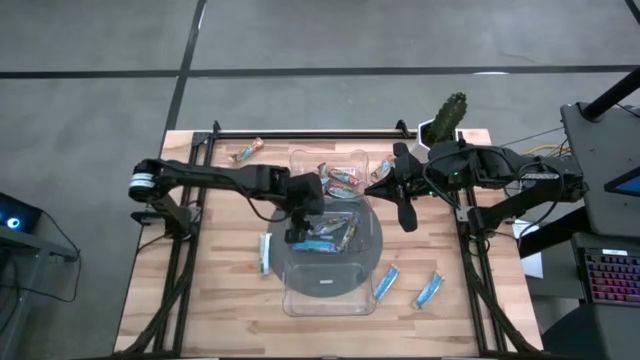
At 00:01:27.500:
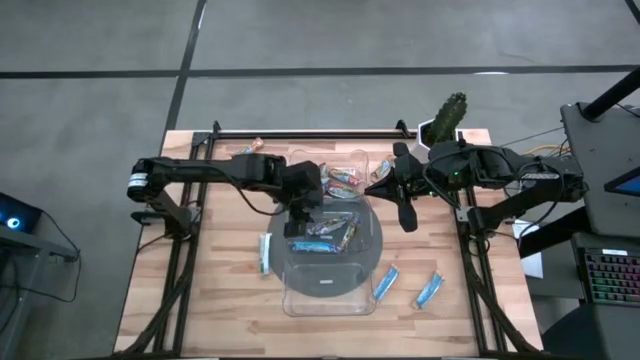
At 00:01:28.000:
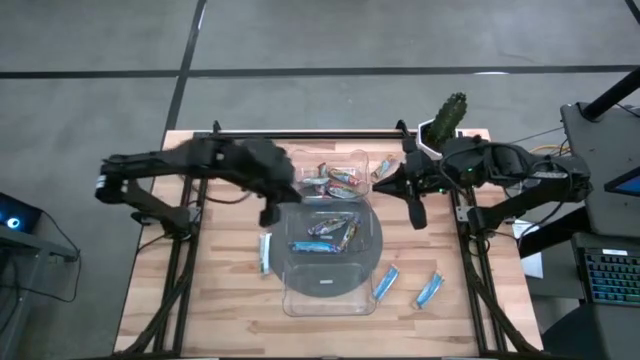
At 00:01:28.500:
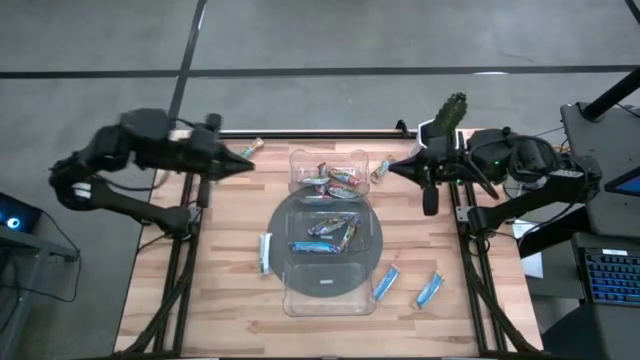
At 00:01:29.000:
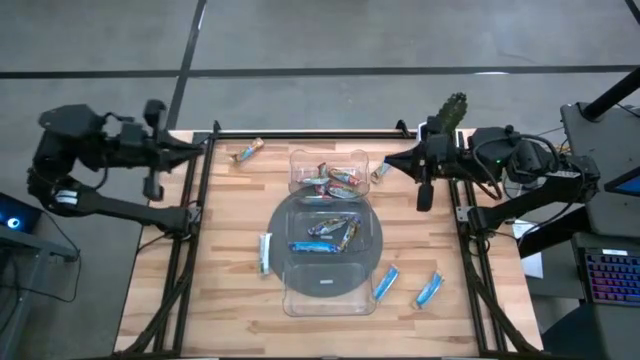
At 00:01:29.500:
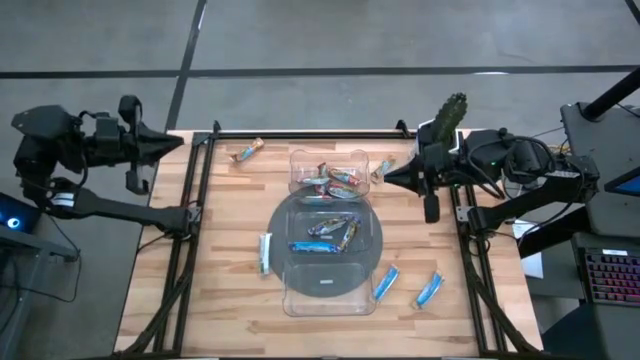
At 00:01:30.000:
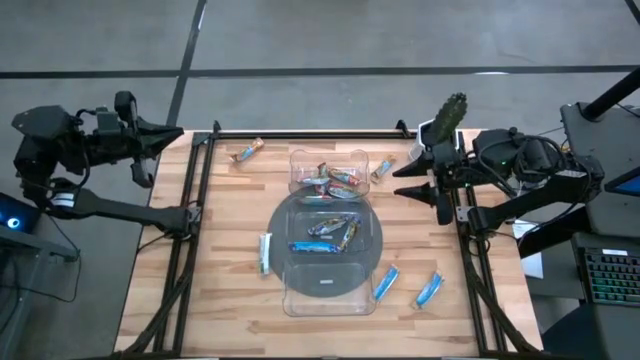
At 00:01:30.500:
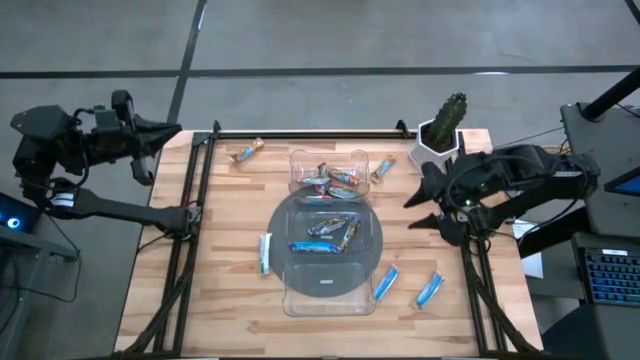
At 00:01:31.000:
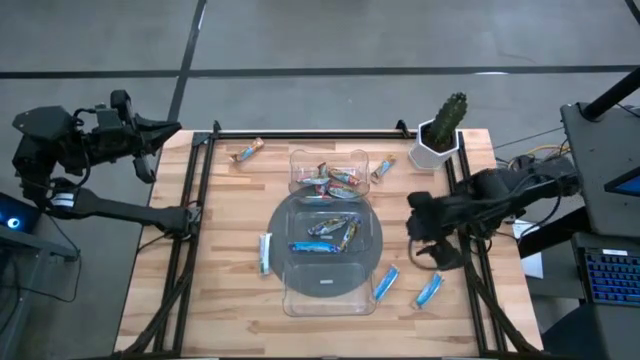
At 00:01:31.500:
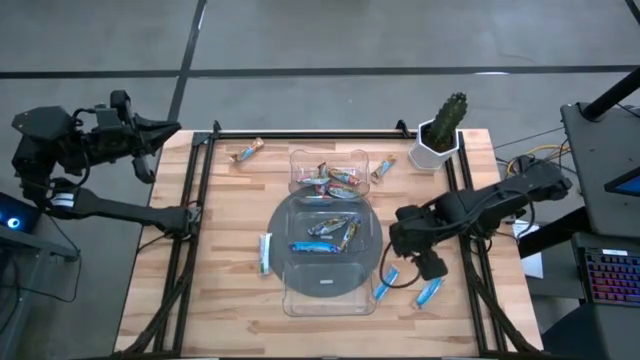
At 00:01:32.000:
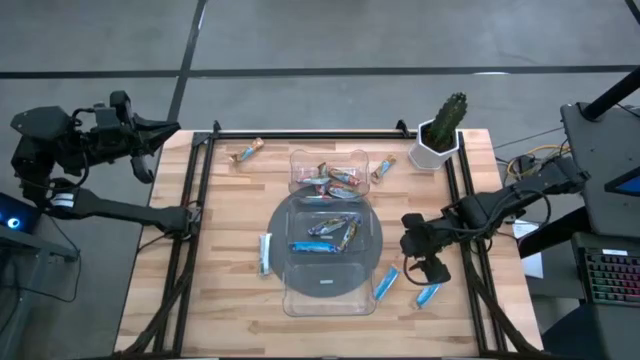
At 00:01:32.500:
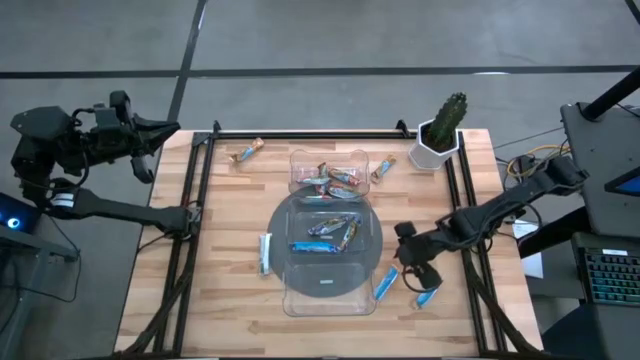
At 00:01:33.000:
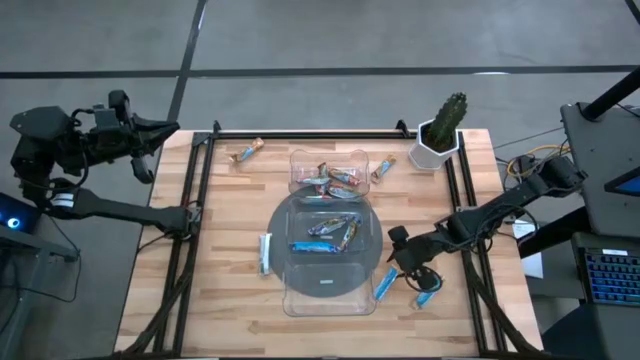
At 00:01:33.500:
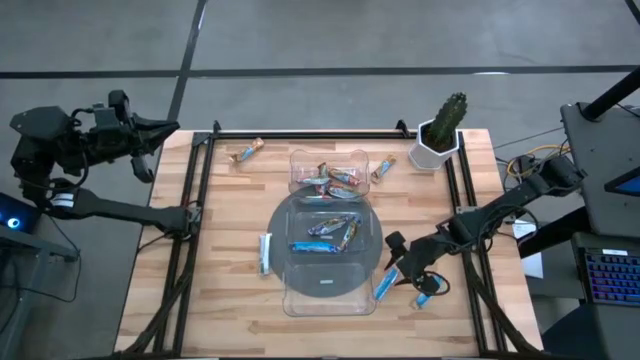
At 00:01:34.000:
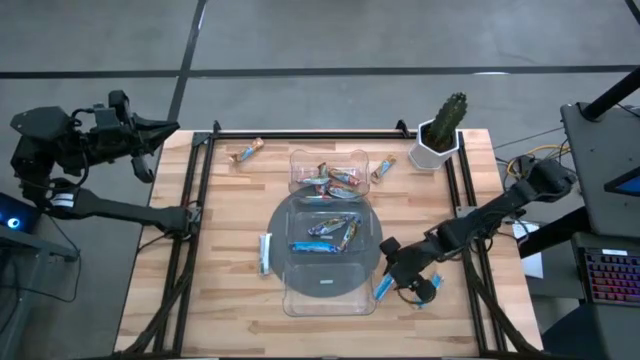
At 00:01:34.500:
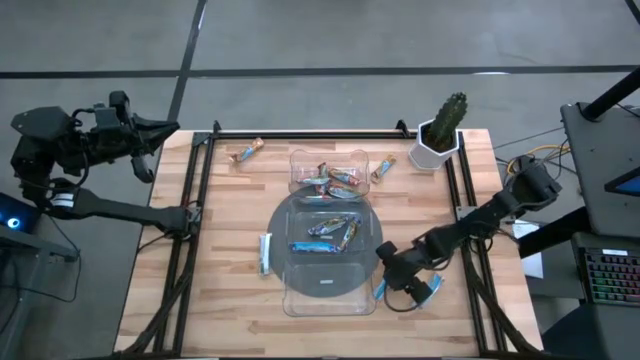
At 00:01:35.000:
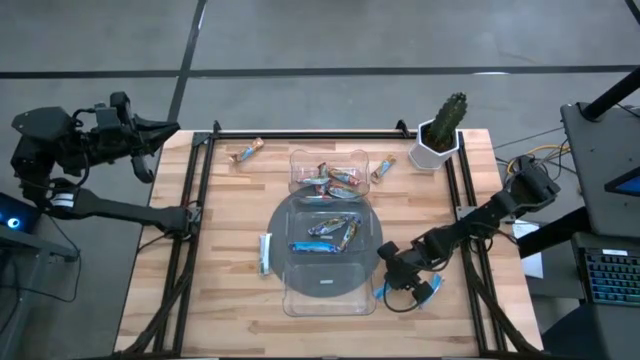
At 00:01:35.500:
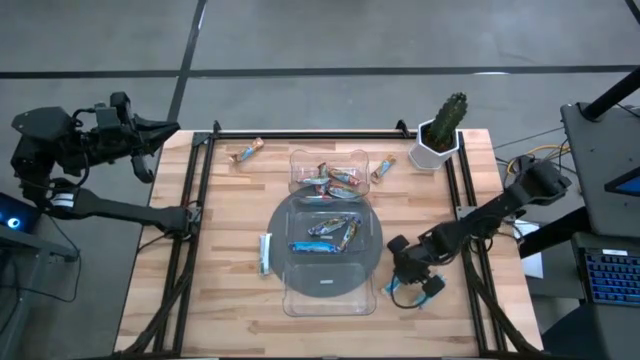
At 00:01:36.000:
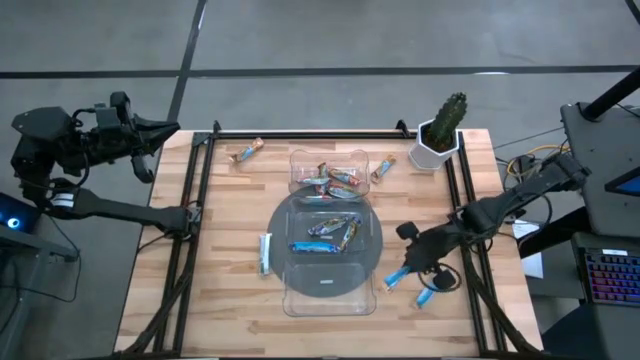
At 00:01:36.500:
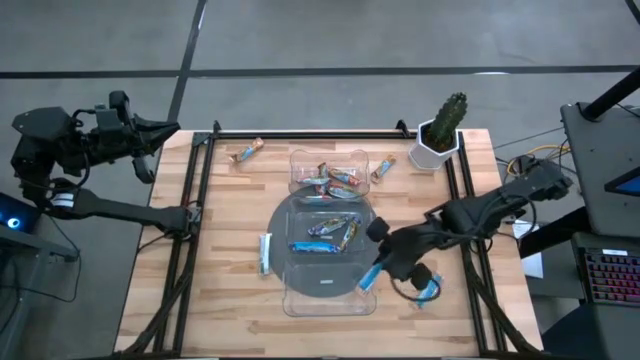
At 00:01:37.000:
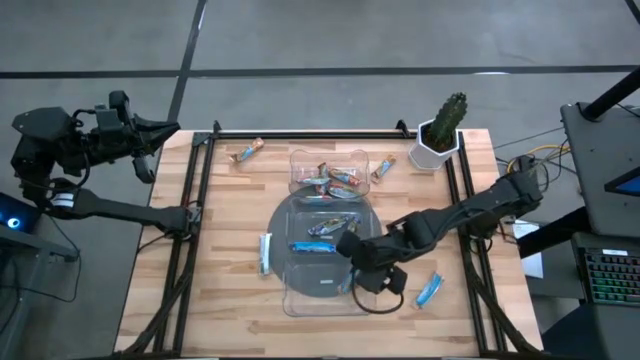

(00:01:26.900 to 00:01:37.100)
Task: Pick and place Granola Bars by type
Put the yellow granola bar into the bottom transparent bin

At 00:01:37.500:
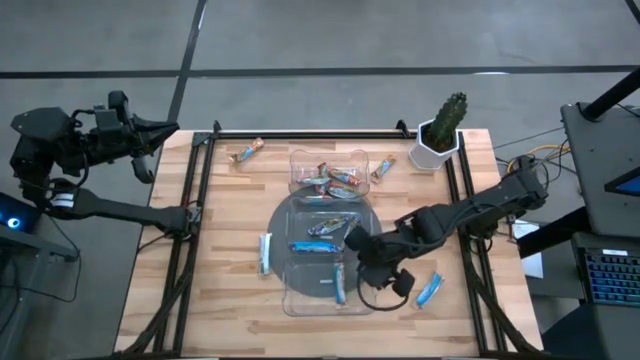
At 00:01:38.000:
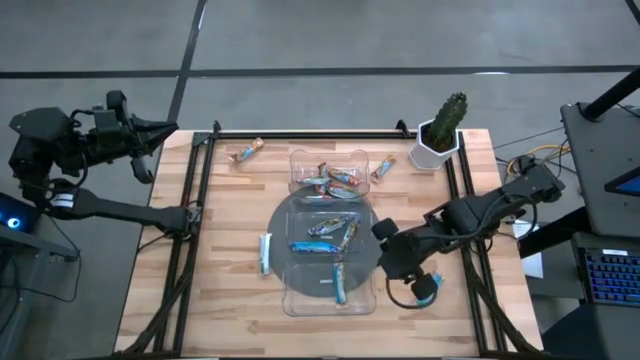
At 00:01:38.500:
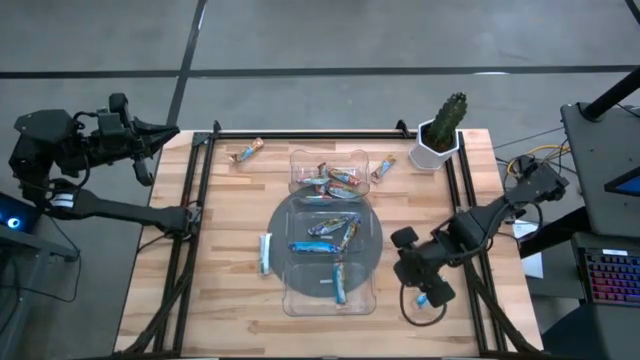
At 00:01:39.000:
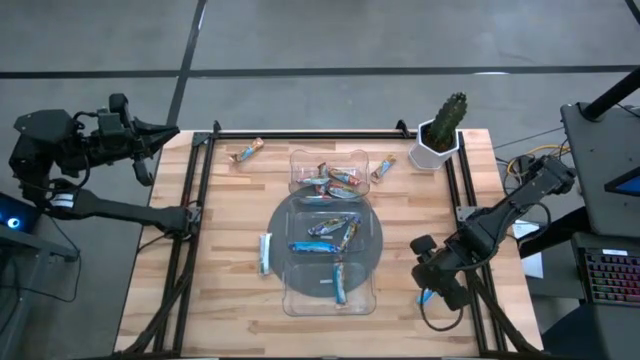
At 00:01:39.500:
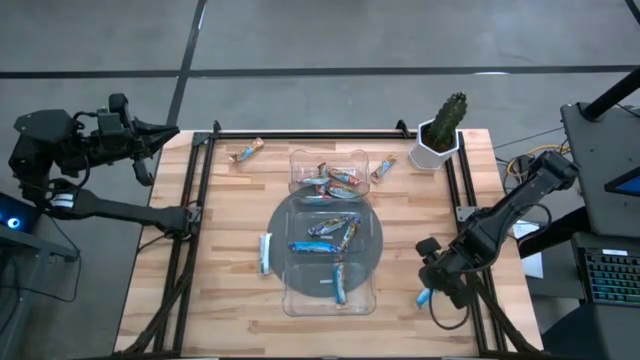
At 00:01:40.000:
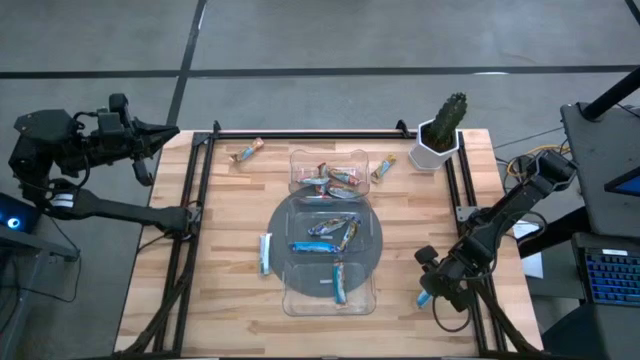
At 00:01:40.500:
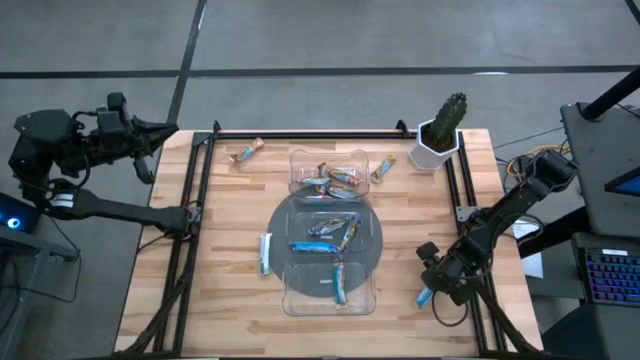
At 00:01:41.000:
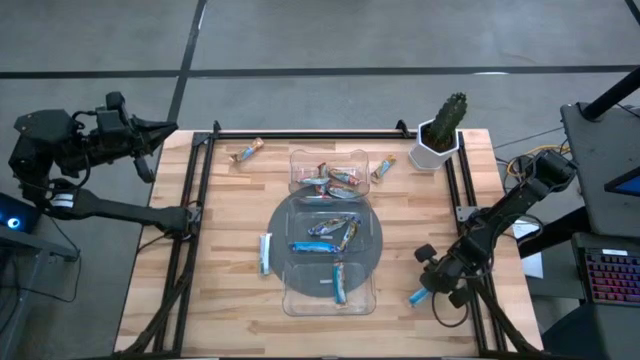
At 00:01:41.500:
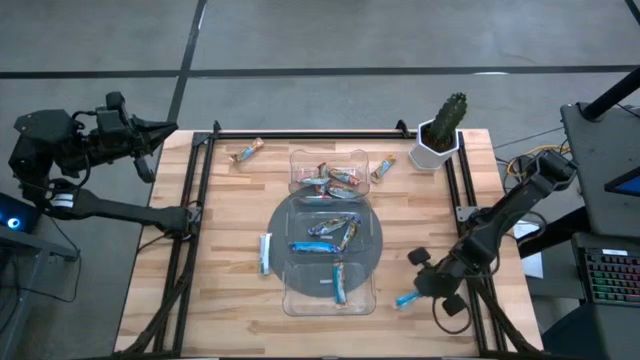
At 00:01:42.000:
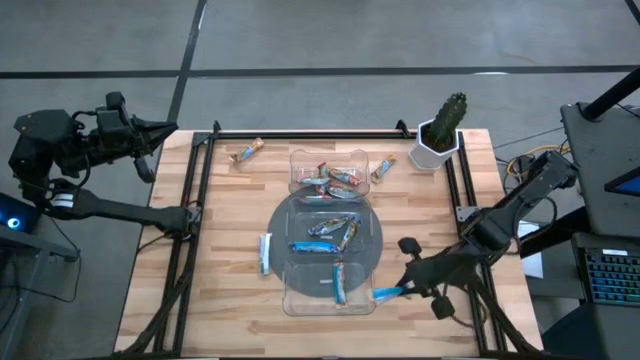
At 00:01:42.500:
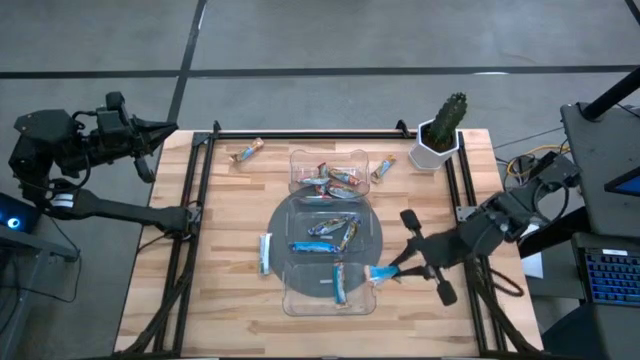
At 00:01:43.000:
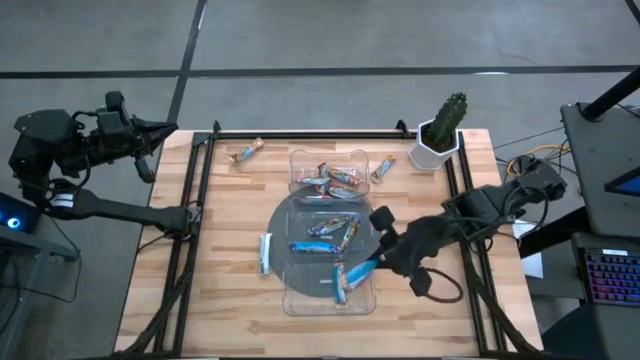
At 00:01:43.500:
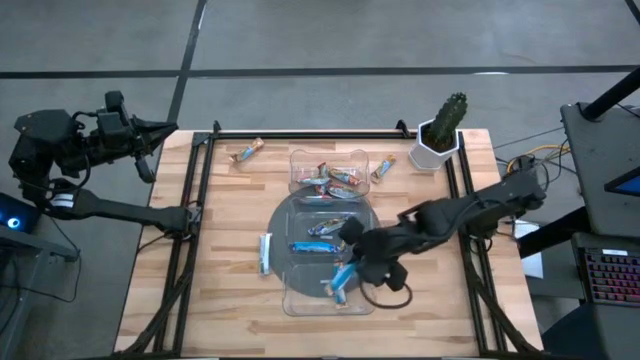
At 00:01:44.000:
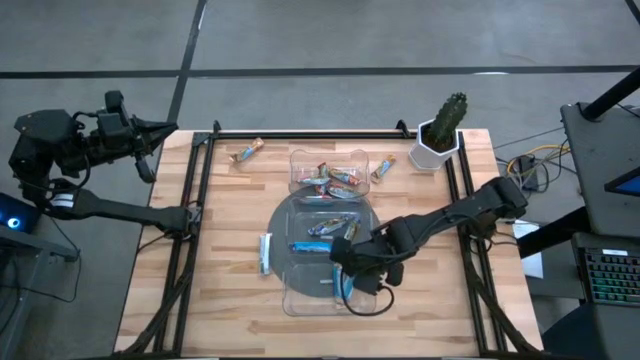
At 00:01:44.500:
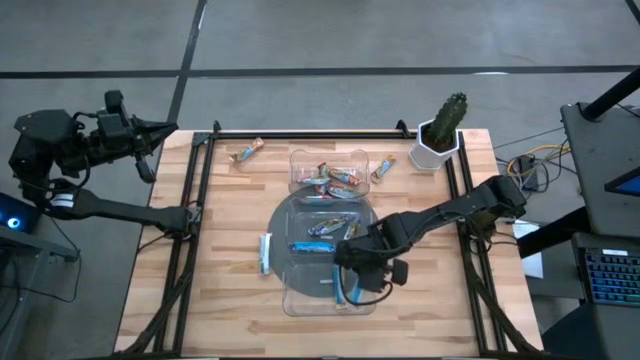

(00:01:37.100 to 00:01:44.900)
Put the yellow granola bar into the bottom transparent bin

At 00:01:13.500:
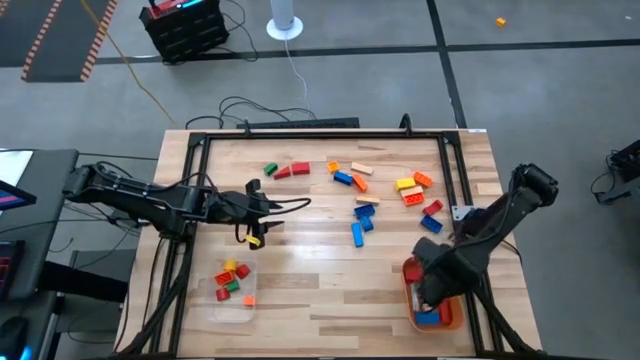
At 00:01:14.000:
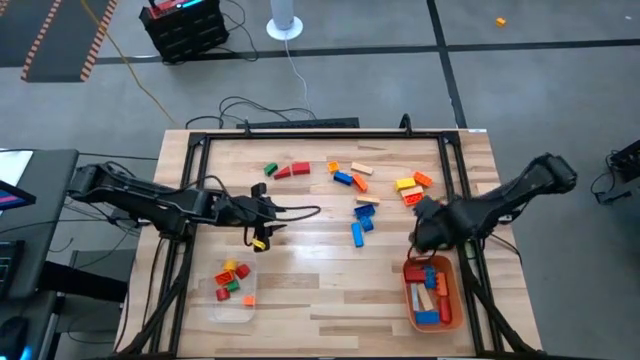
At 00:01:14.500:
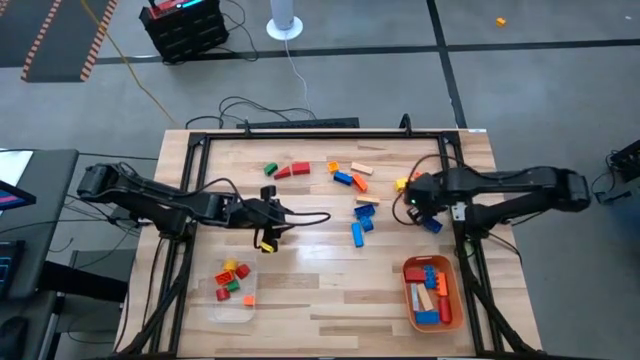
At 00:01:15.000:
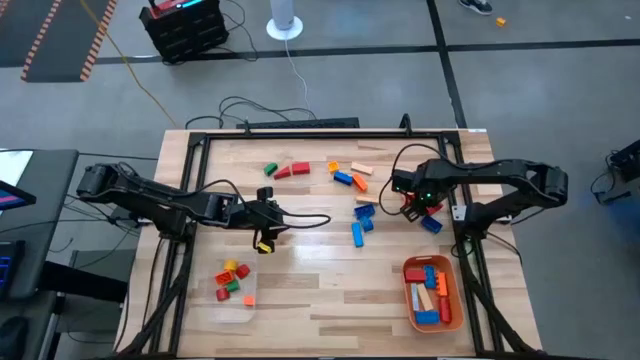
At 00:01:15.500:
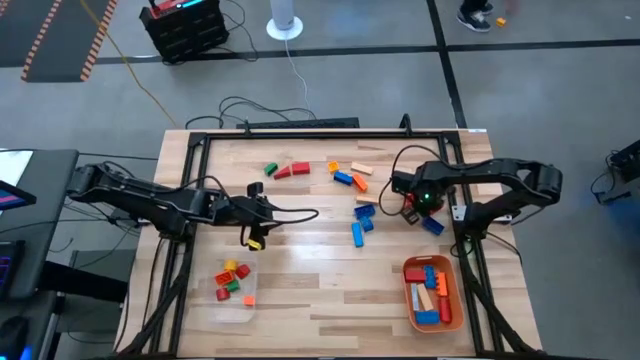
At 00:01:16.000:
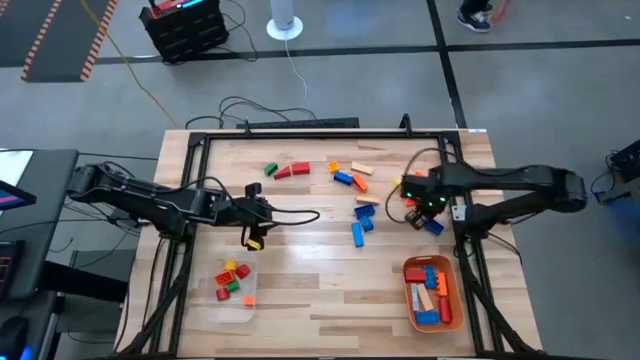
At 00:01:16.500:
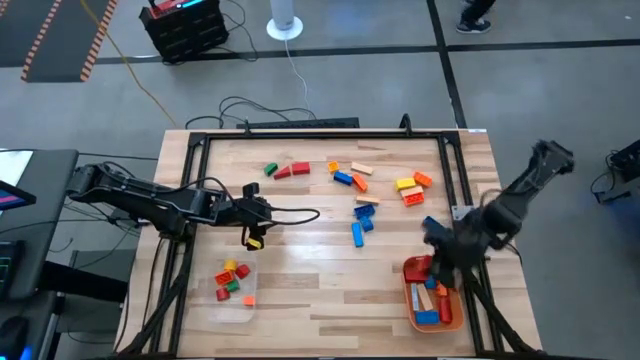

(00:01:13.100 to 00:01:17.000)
Task: Sort blocks by size
Put the large red block into the orange bin
